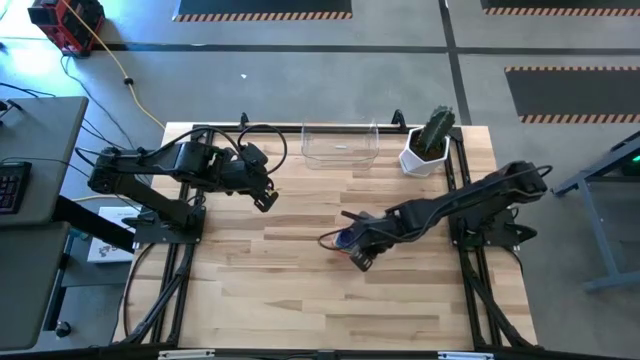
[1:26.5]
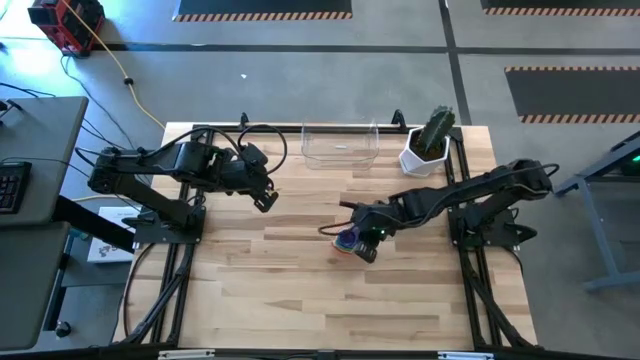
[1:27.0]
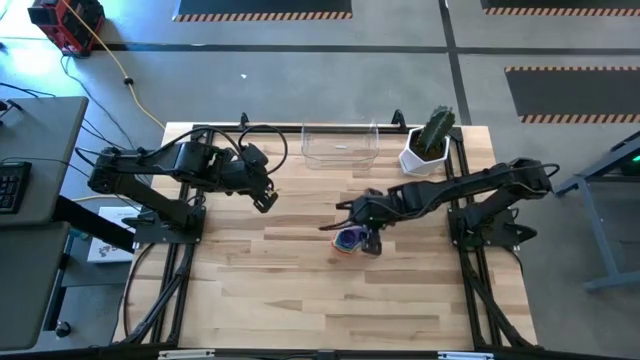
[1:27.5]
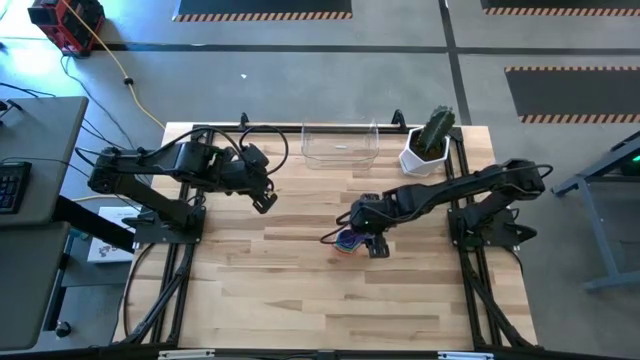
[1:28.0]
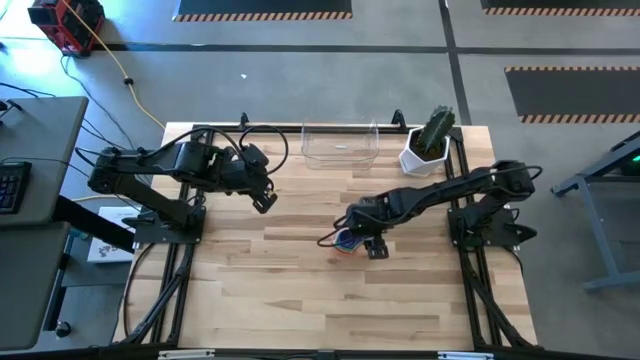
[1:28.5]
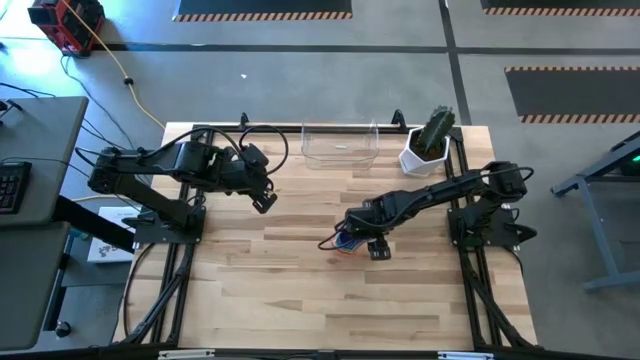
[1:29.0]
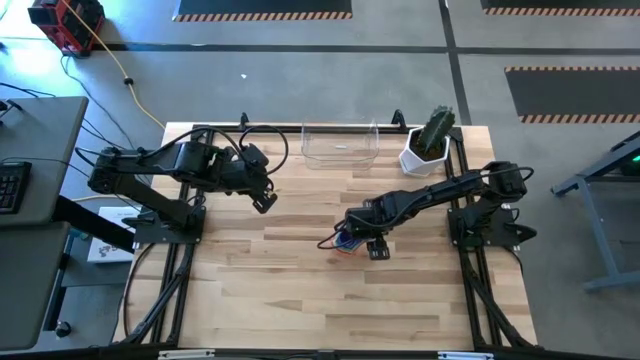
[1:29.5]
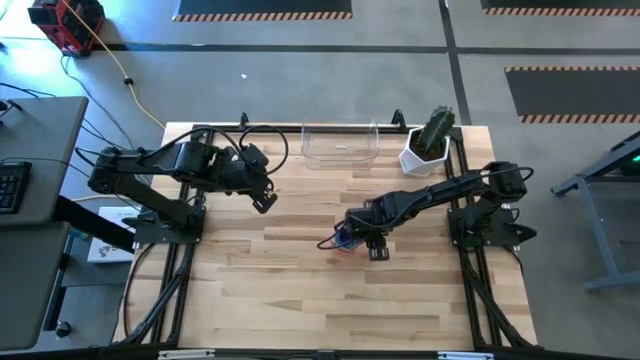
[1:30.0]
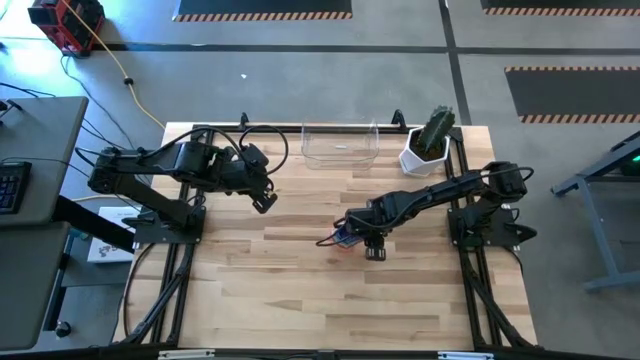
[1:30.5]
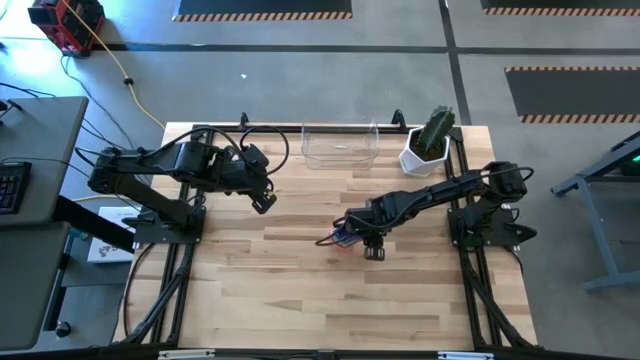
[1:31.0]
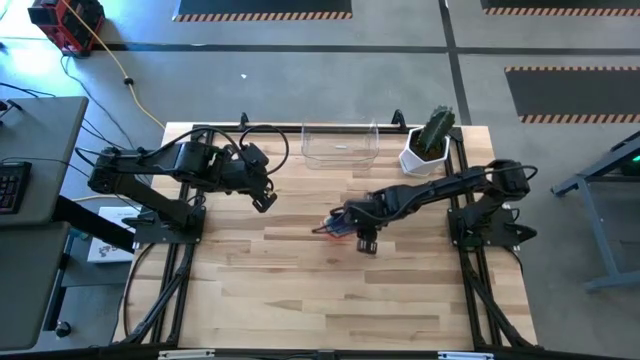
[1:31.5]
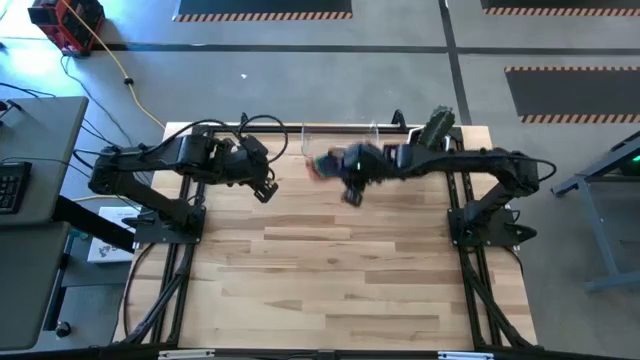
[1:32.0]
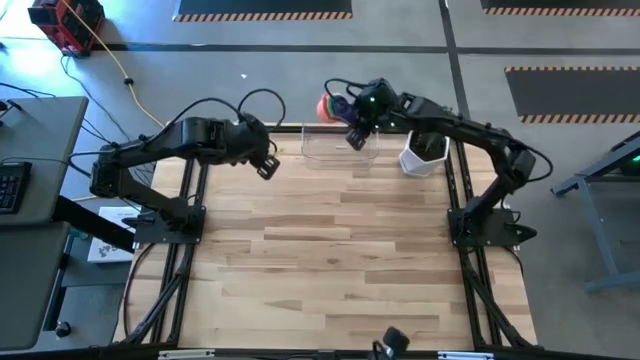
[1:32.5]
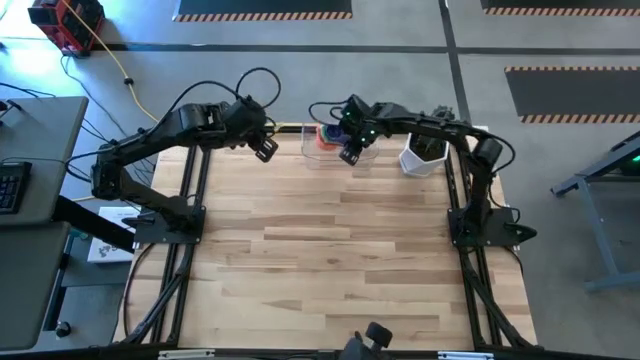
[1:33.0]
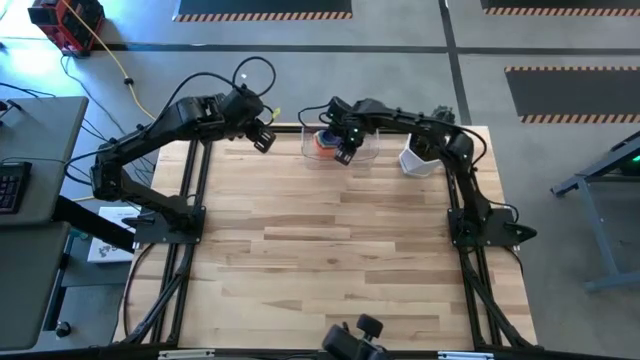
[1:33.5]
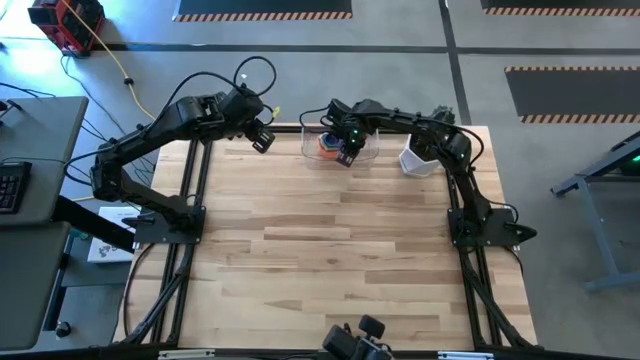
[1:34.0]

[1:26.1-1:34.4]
Task: Nest measuring cups in basket
Put the measuring cups into the transparent bin

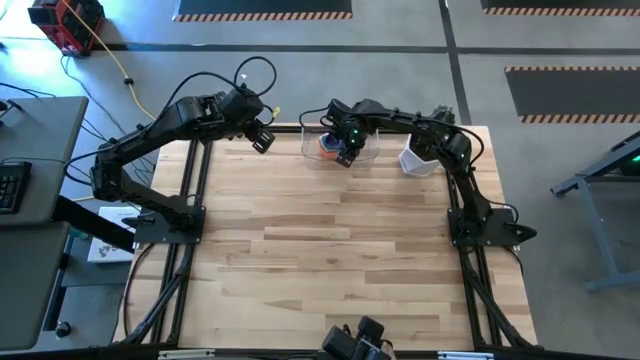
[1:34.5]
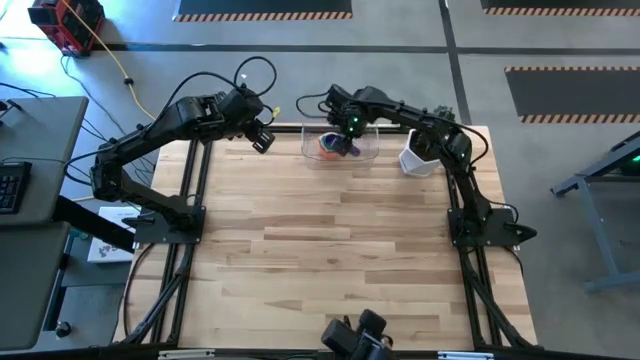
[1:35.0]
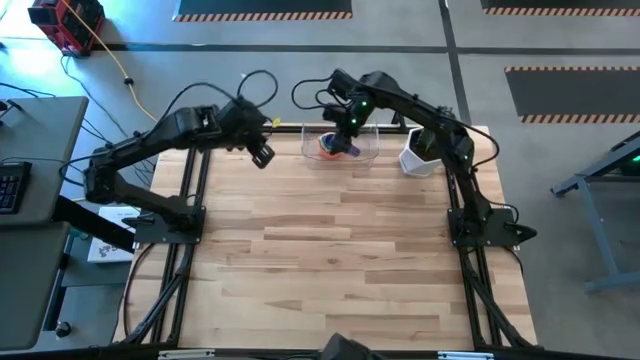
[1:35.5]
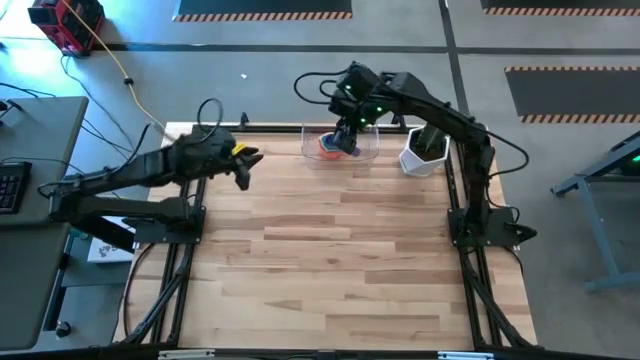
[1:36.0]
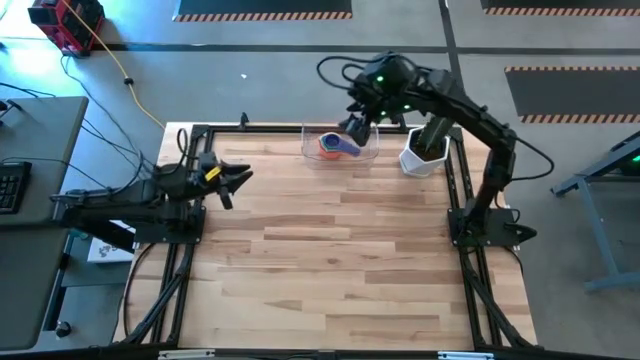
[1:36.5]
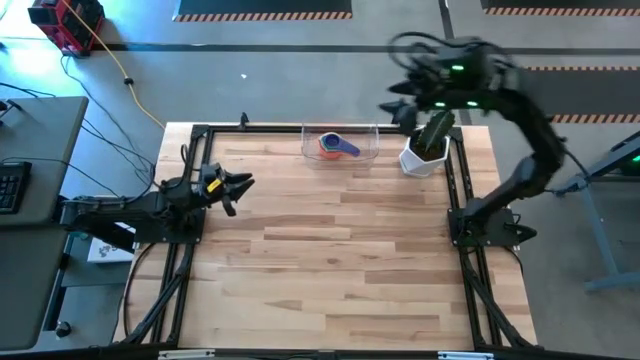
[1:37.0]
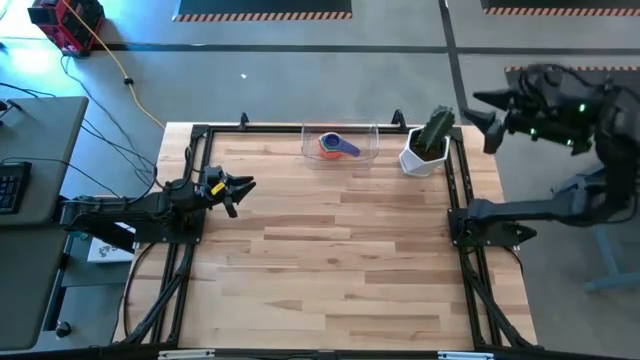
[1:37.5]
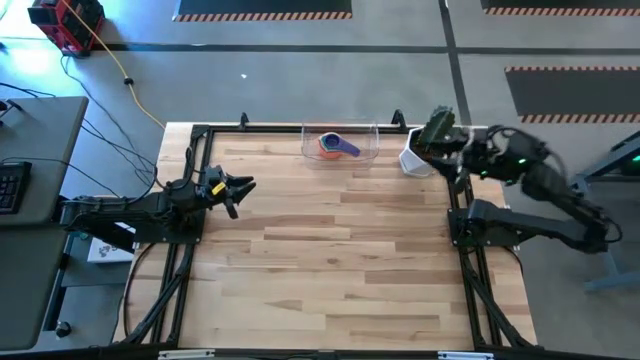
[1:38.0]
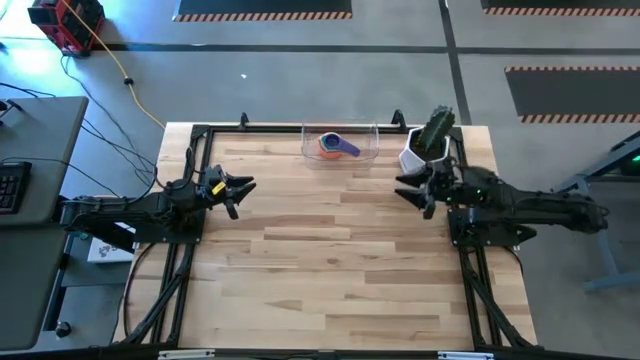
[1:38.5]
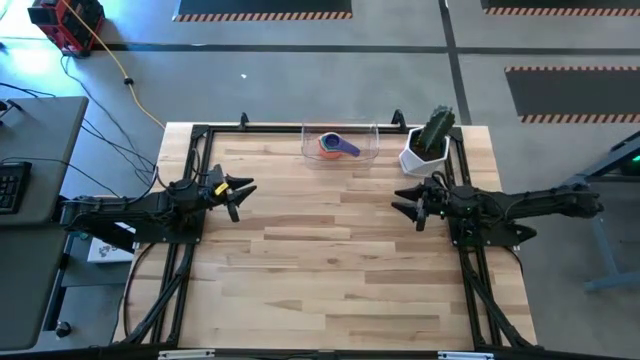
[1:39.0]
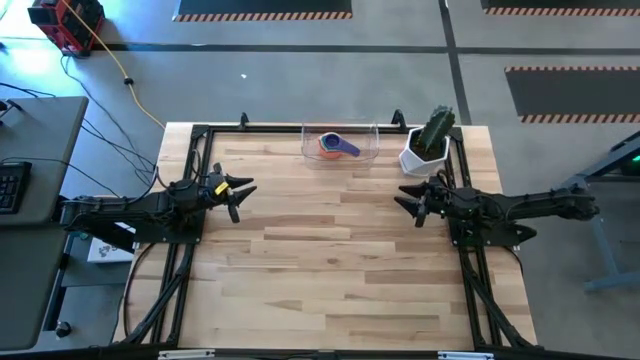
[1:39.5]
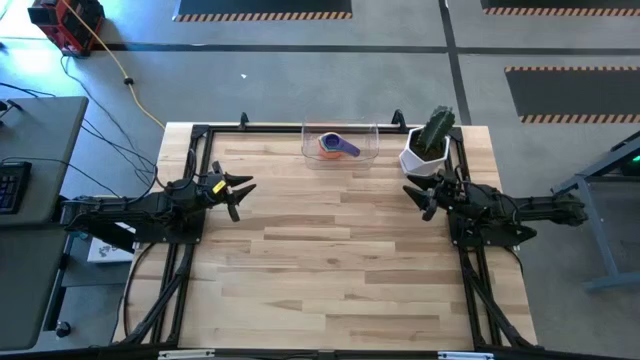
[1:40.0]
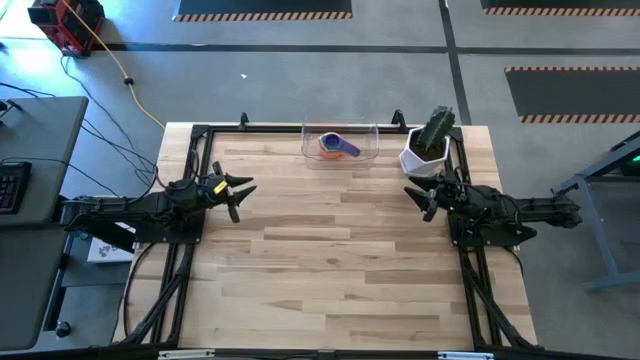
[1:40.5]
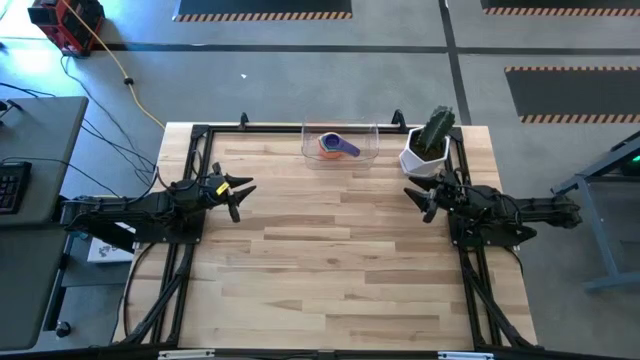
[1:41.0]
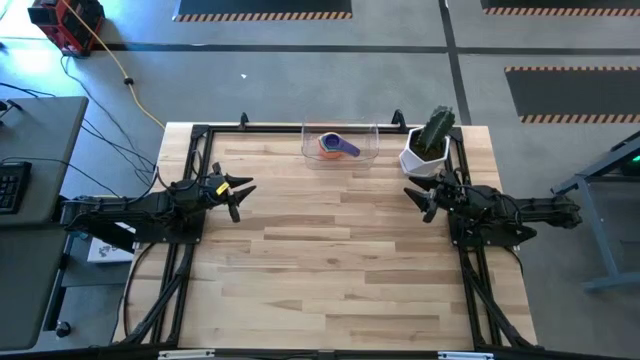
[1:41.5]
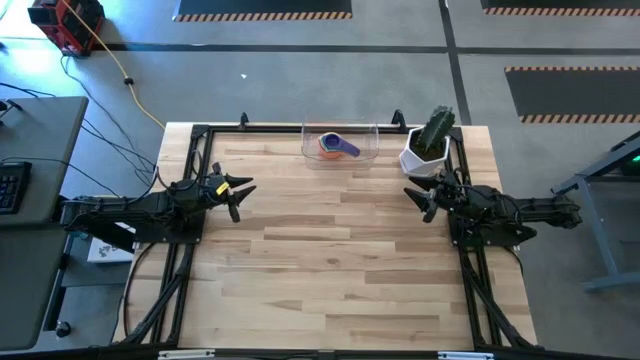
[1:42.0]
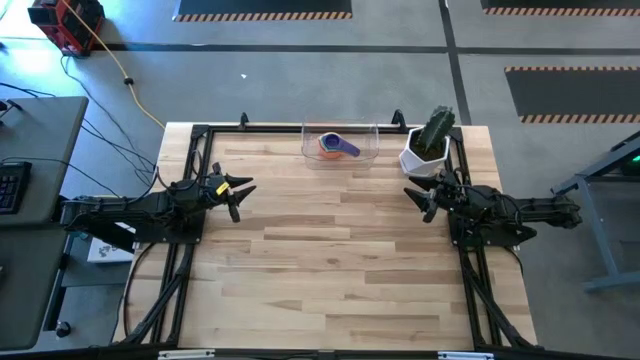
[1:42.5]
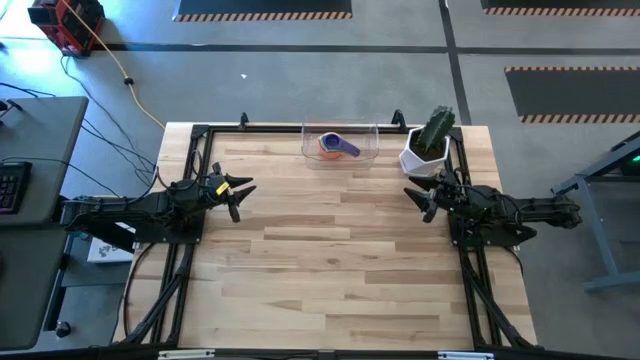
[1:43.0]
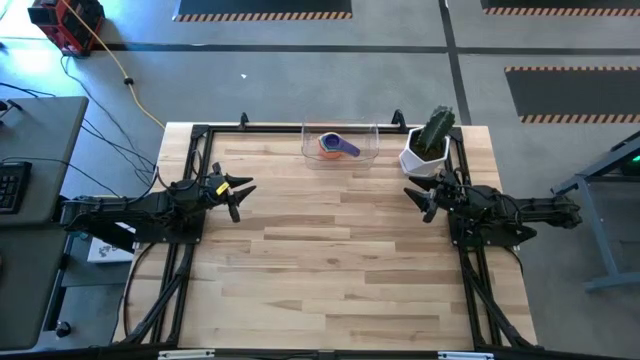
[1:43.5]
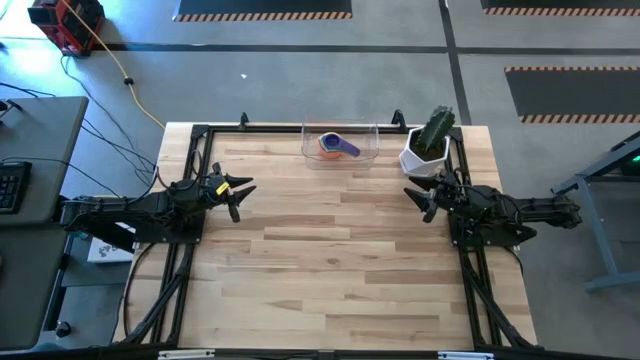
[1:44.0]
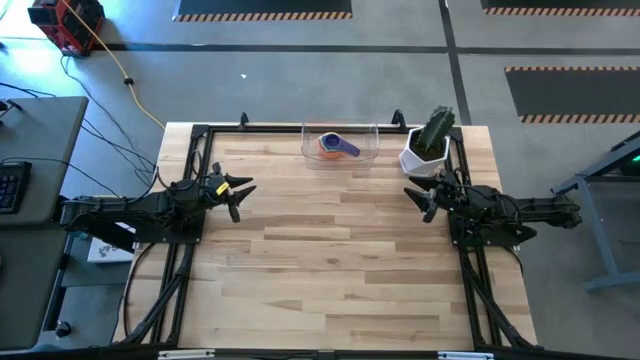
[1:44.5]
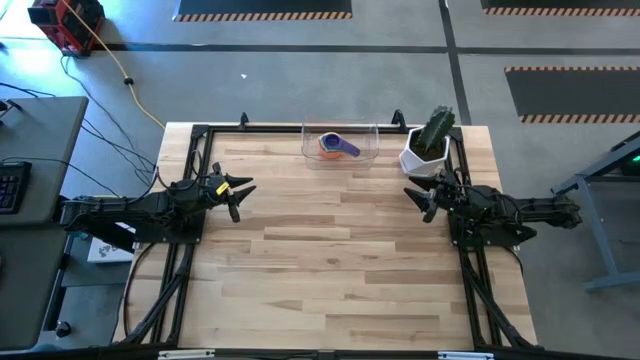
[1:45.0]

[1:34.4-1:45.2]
Return to Home Position

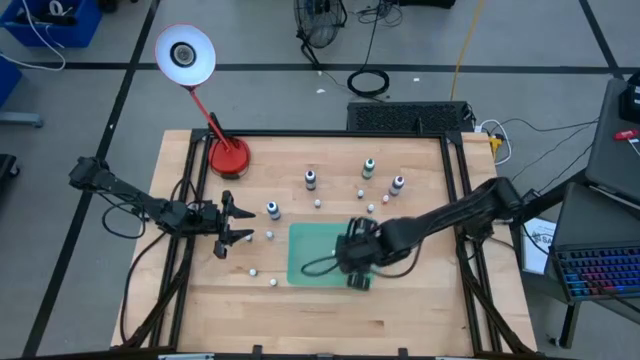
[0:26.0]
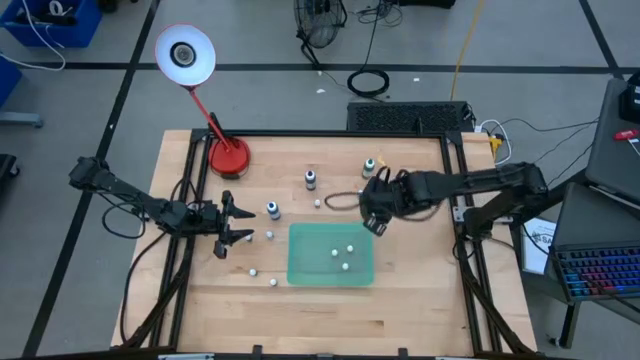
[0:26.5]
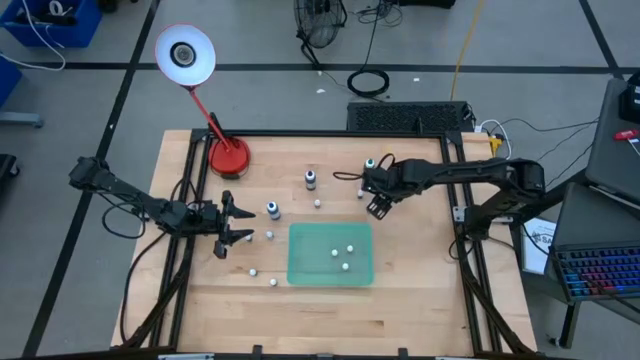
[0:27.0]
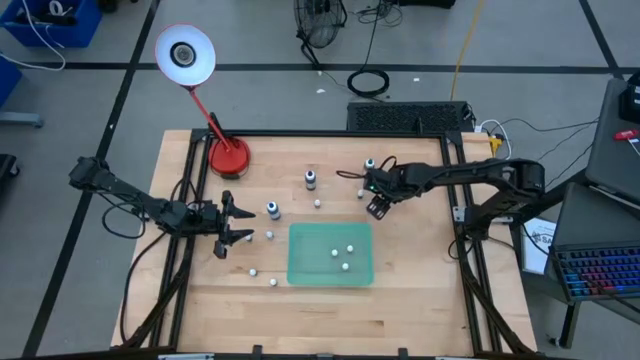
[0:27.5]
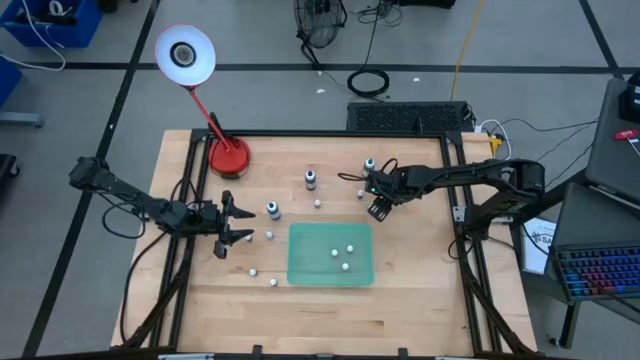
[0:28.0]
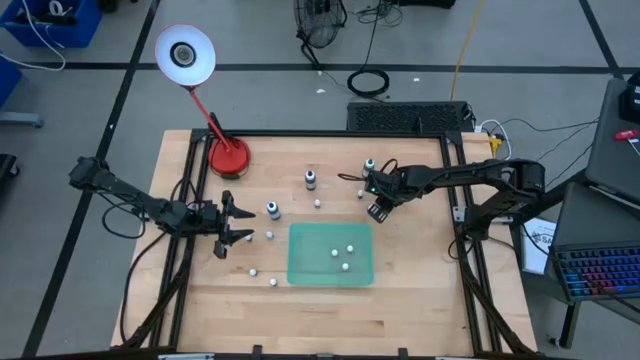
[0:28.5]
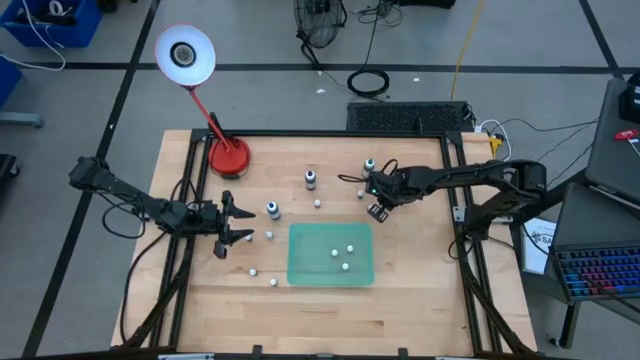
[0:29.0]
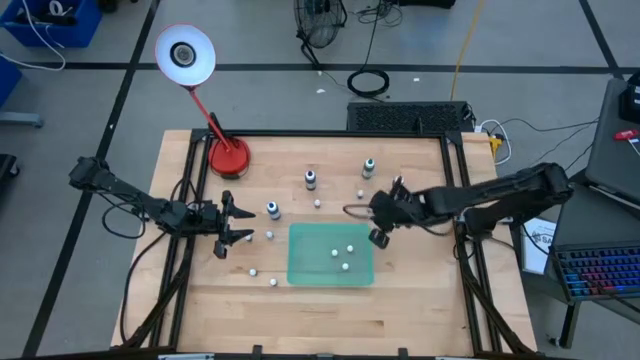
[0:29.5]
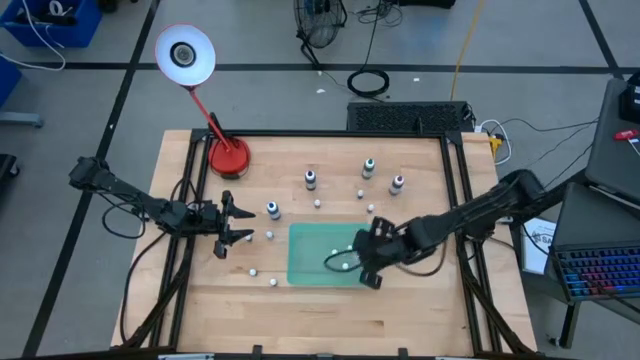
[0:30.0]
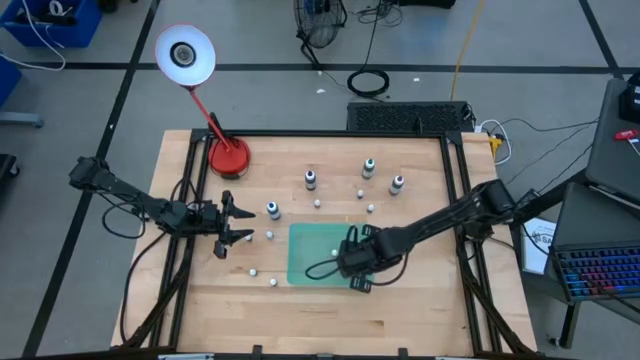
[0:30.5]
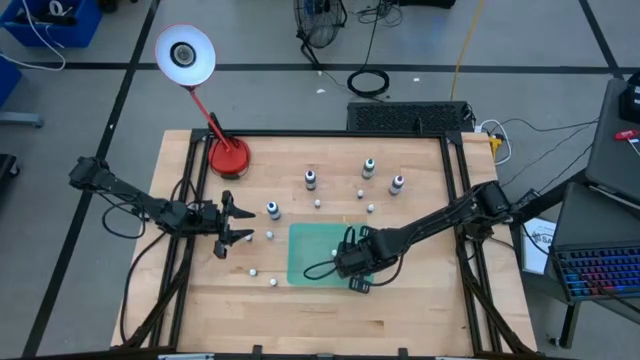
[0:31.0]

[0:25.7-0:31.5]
Task: Pick & Place food coloring
Put the small yellow food coloring bottle into the green bin
